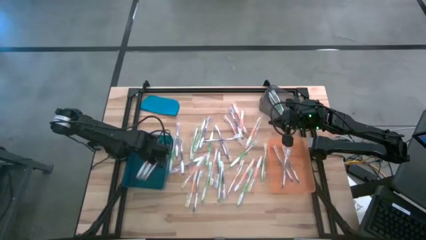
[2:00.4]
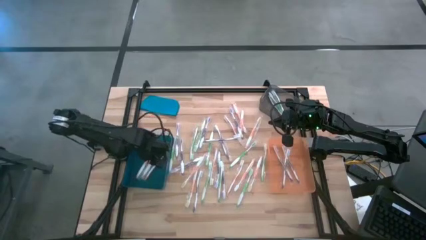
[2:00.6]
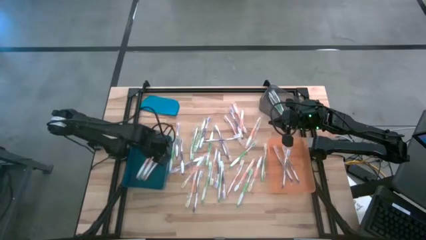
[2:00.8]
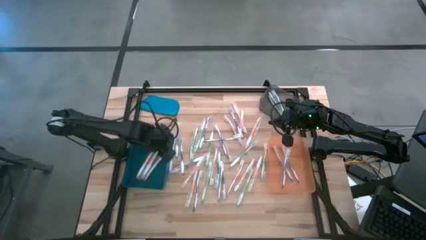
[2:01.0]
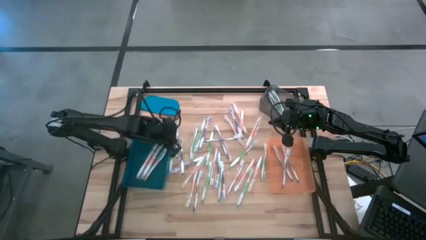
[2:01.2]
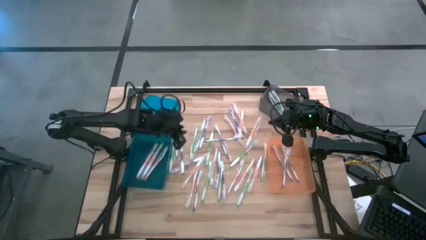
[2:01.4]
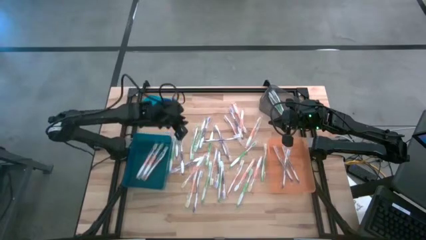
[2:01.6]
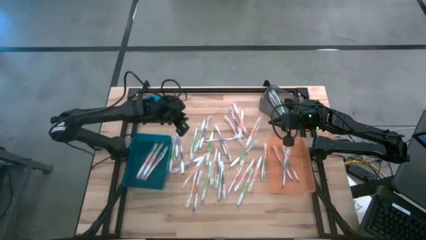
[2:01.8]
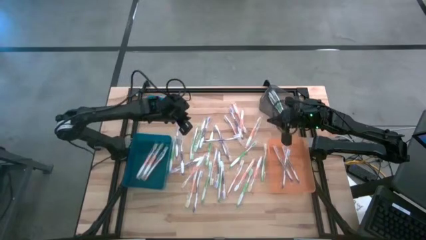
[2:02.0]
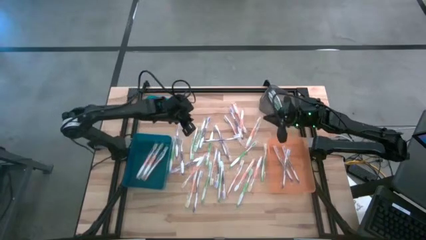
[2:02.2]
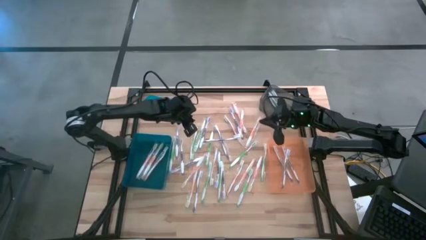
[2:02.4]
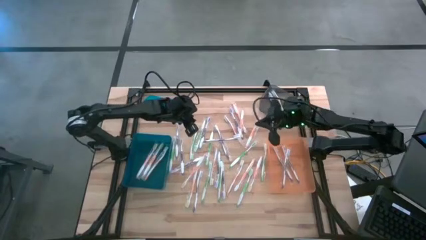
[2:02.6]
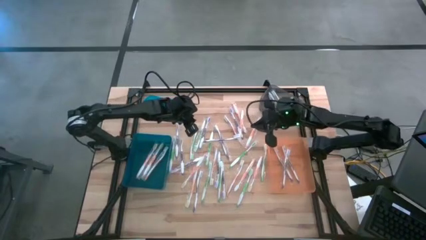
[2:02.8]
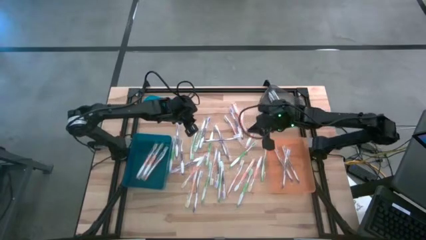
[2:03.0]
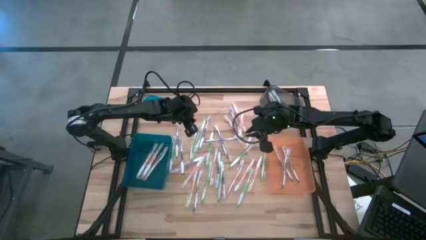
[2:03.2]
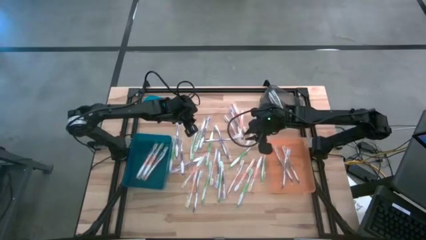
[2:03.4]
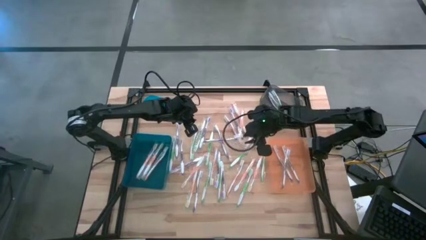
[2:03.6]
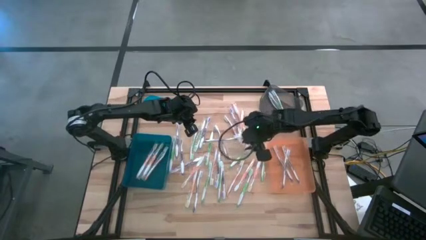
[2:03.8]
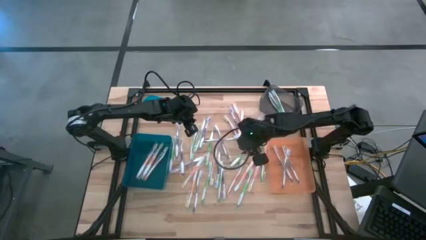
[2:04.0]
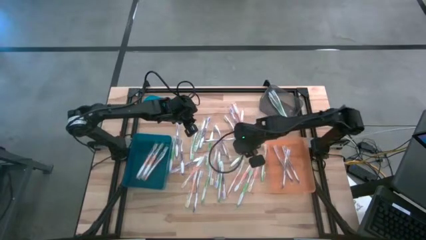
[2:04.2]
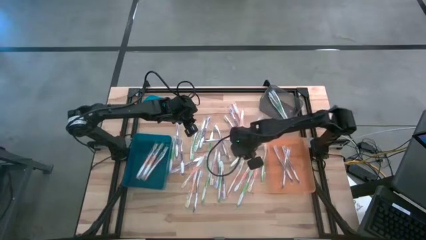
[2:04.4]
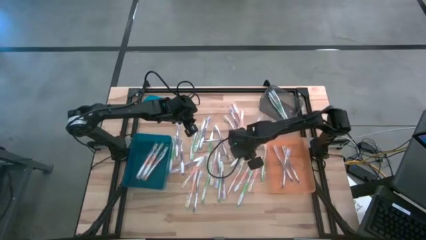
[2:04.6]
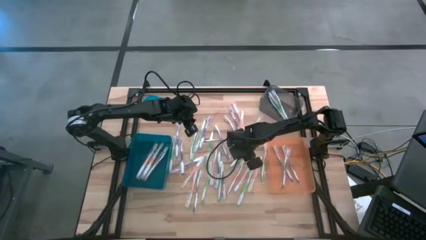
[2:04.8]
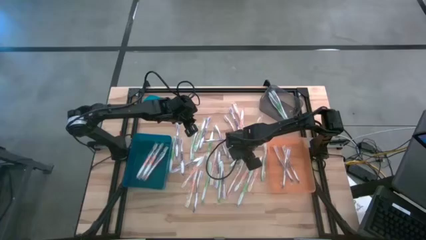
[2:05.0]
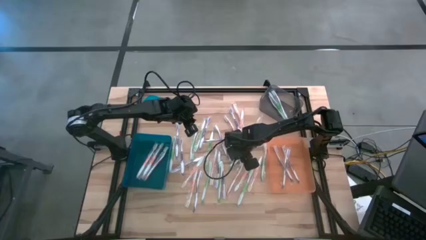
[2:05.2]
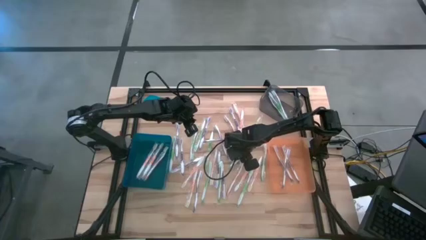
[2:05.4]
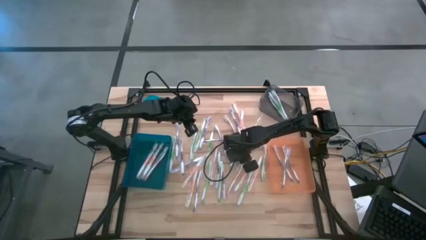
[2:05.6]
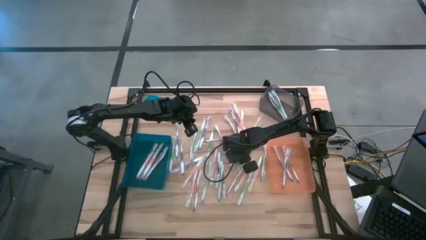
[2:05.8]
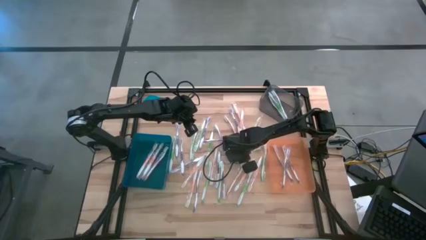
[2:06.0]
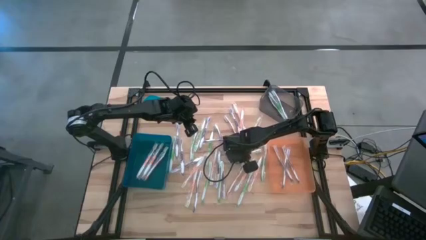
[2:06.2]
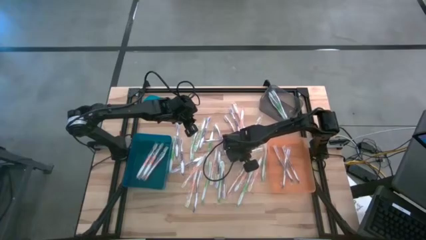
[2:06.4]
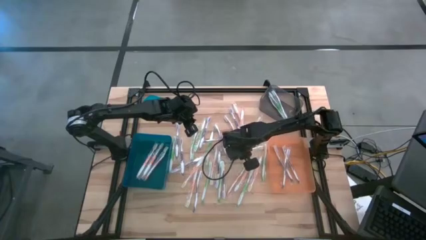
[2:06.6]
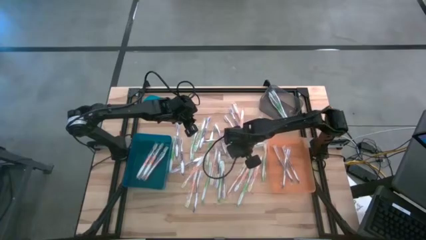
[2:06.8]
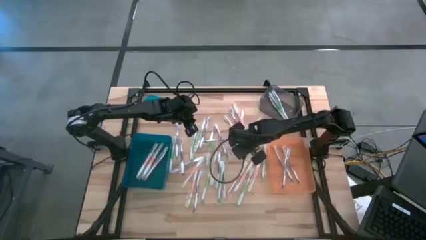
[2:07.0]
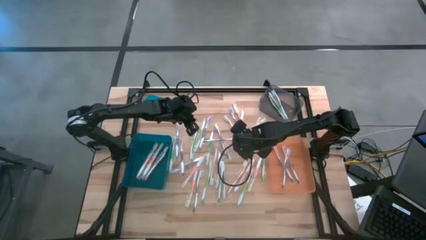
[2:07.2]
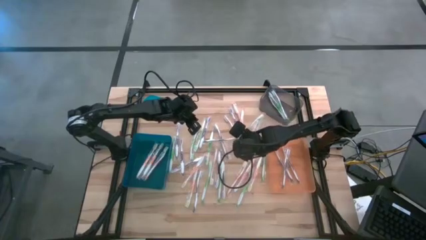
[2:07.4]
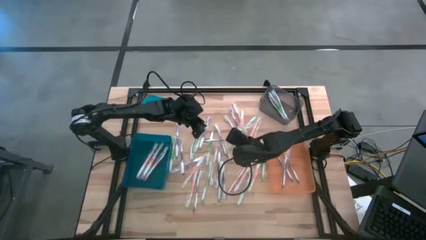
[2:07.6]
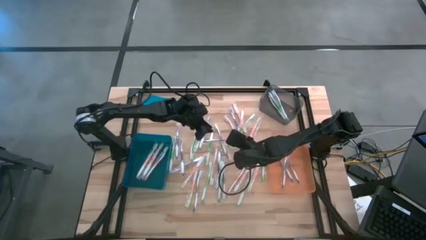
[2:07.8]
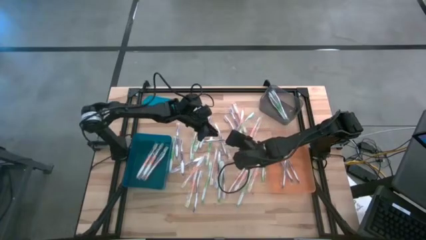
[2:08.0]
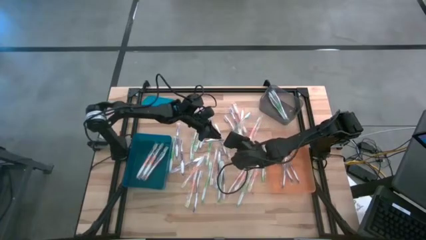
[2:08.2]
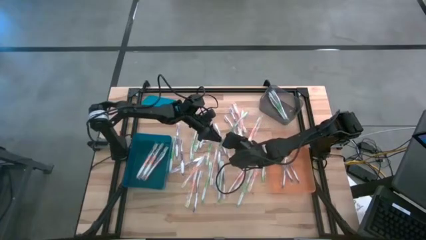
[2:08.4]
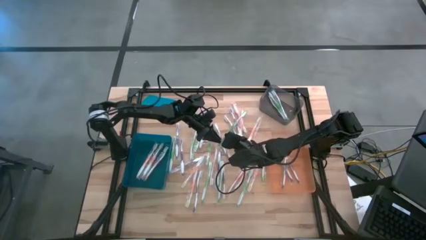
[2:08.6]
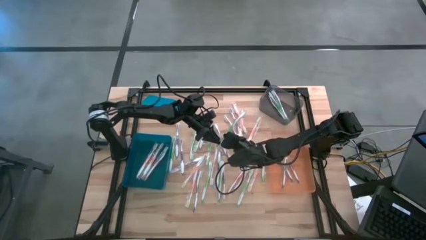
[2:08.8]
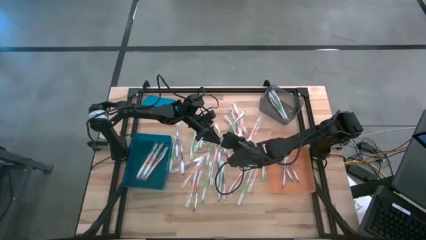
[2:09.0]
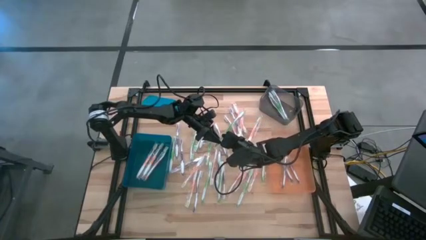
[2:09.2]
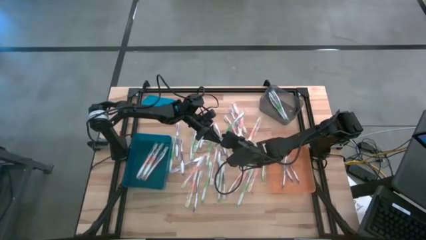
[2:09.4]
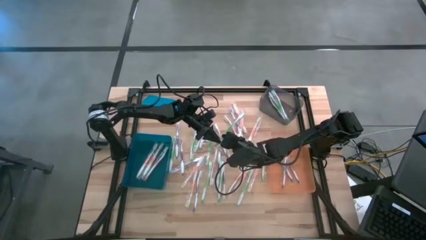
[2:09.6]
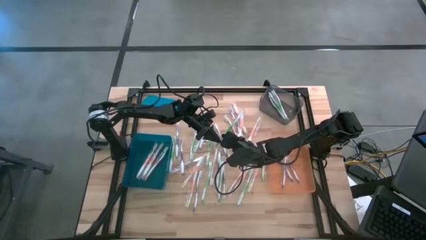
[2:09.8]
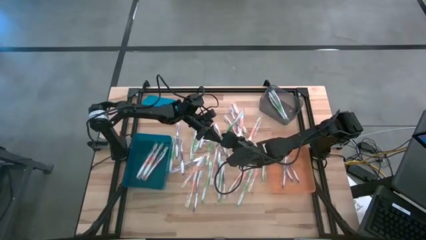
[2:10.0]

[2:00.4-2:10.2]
Task: Pick & Place Toothbrushes
Put the green toothbrush into the black bin

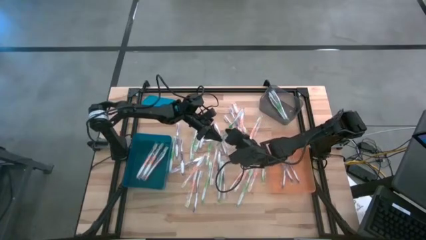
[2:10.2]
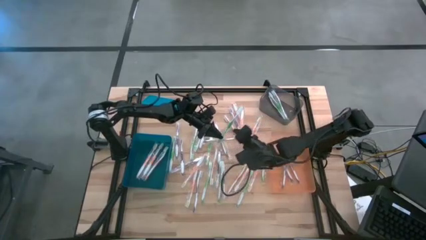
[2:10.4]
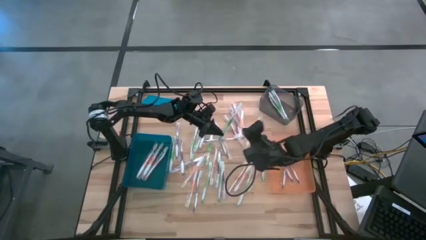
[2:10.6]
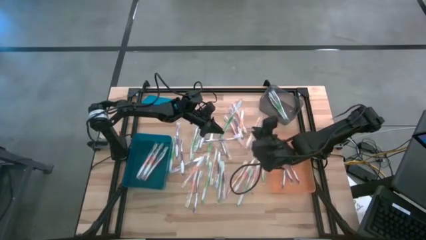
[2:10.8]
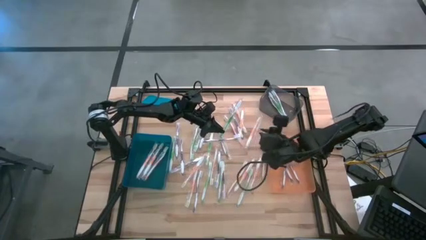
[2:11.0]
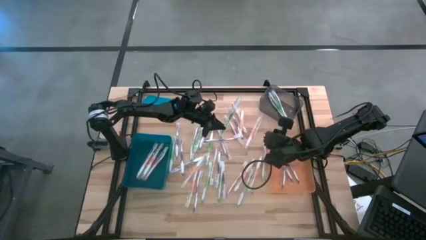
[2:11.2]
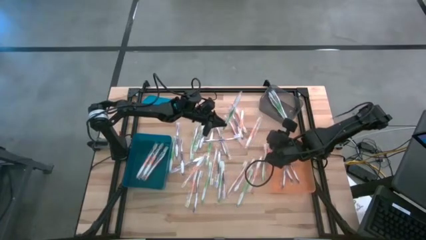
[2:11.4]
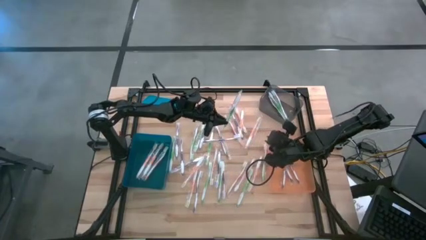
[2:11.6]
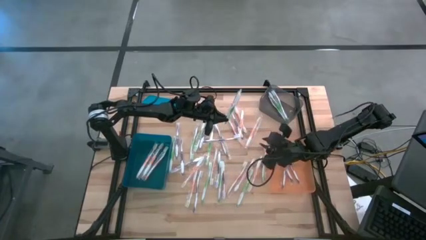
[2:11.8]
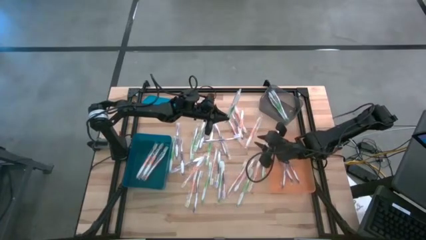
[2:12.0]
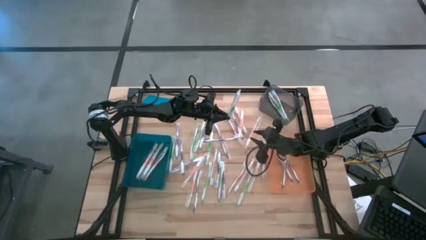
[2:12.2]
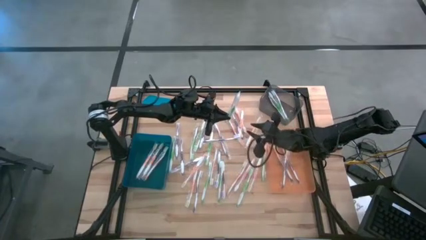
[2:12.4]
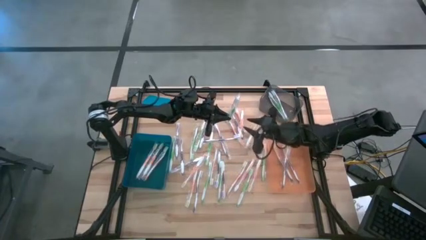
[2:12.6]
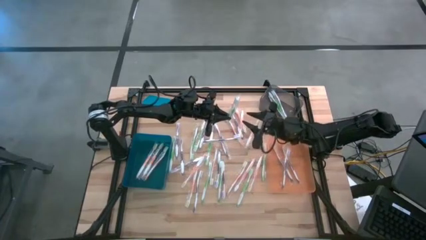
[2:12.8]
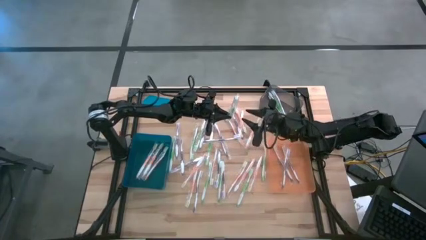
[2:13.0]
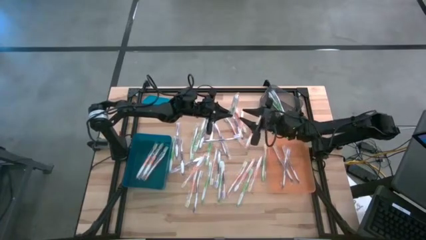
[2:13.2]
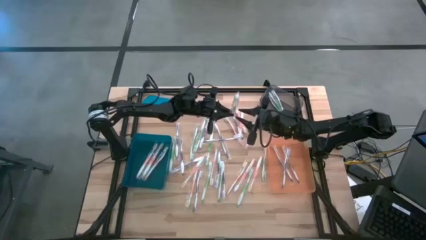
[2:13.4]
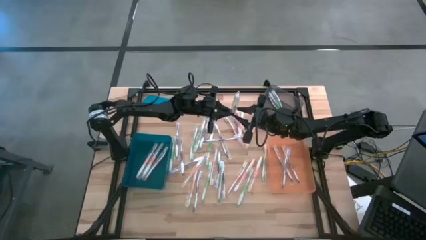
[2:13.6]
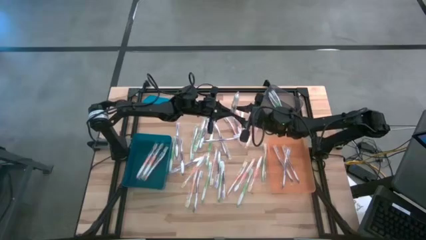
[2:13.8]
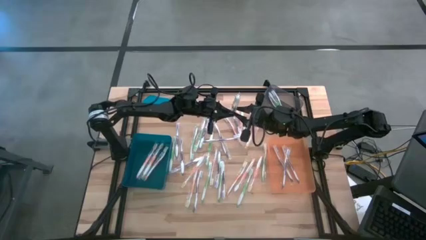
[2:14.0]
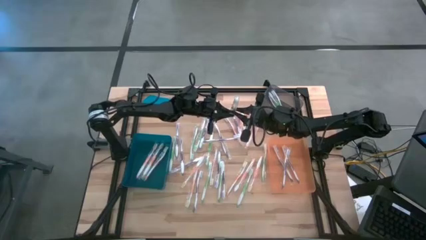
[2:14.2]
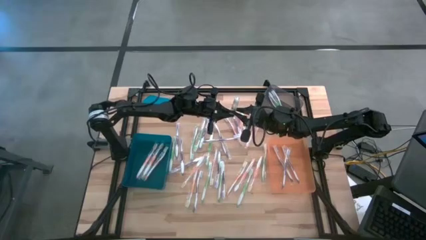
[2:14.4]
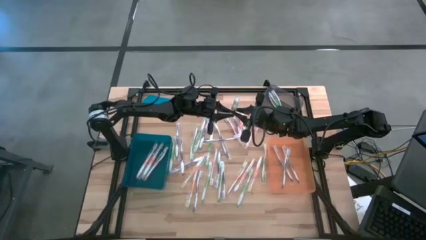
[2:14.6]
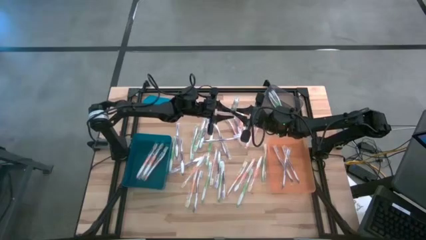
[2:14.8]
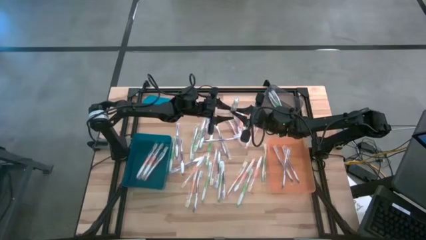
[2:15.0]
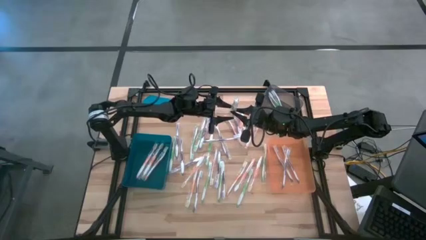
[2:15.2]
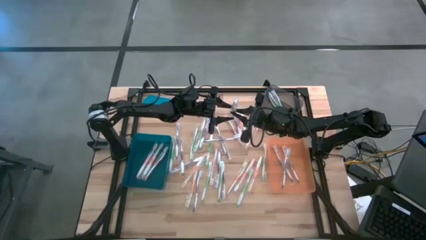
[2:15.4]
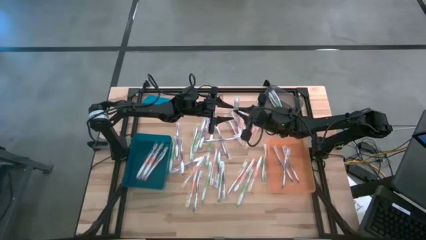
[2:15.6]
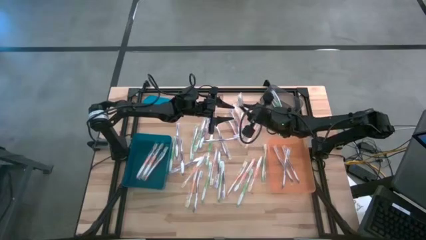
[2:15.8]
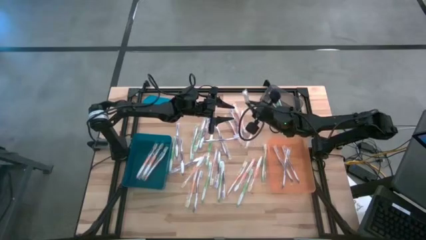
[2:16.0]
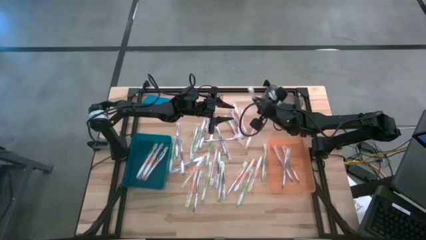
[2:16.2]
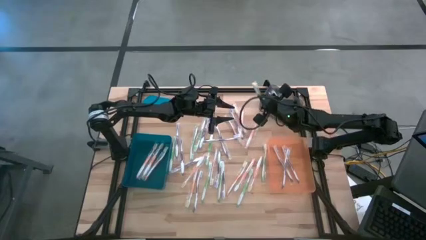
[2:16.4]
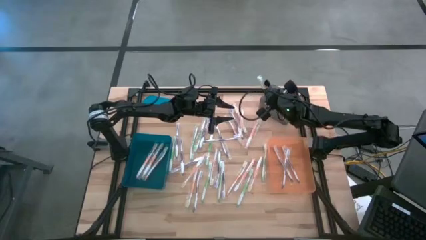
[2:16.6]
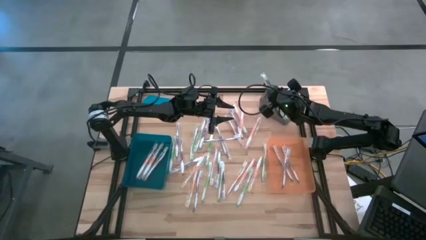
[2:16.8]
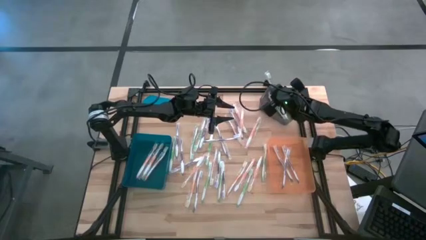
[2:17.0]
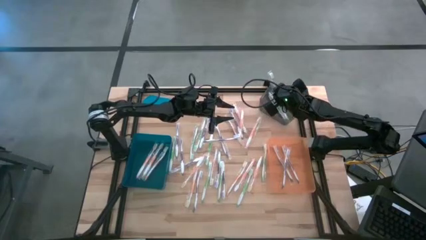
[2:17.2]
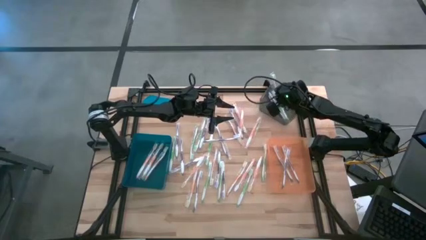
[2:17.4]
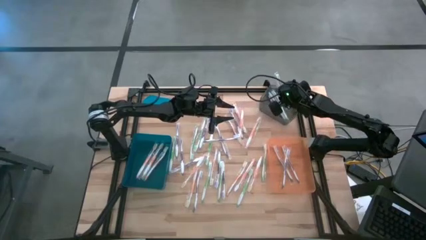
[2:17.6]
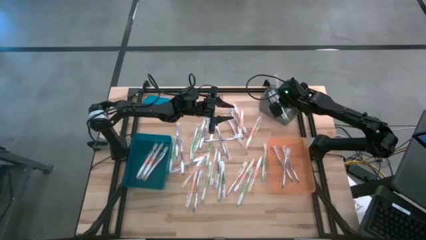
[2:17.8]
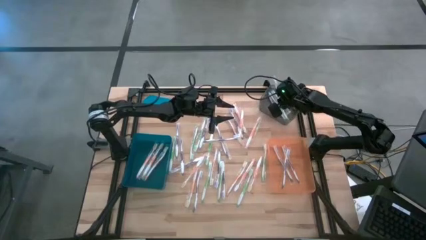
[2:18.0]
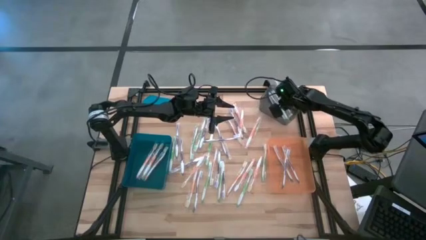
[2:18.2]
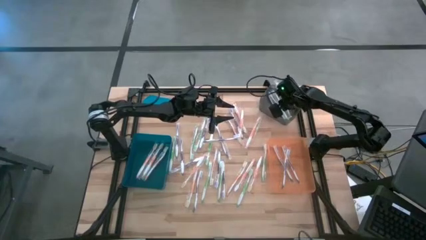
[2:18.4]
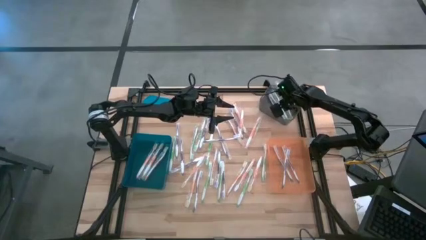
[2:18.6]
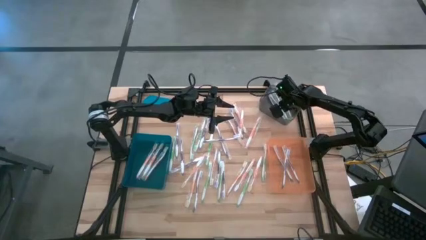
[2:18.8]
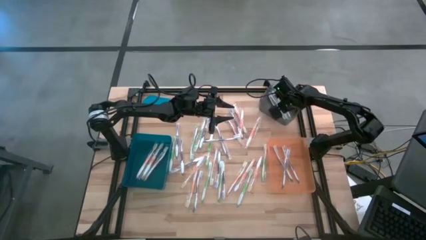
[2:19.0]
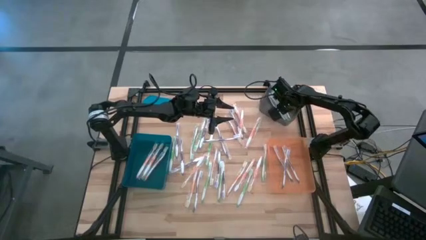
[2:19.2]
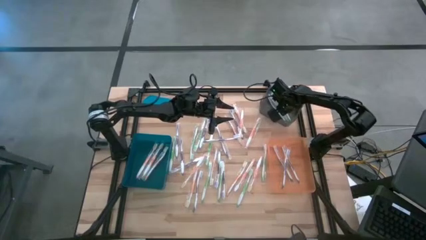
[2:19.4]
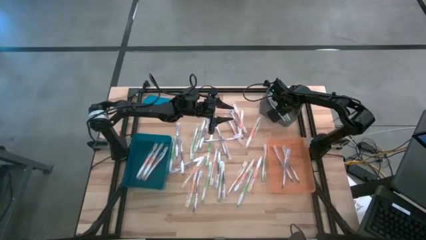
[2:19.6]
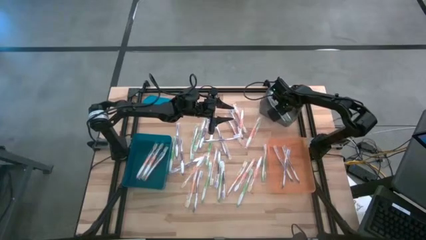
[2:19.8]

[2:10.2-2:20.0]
Put the green toothbrush into the black bin
